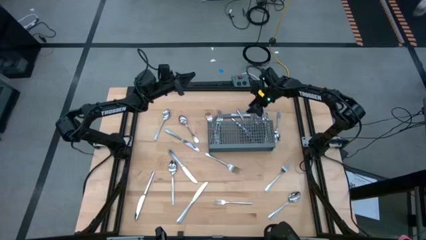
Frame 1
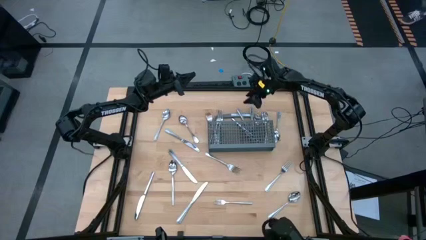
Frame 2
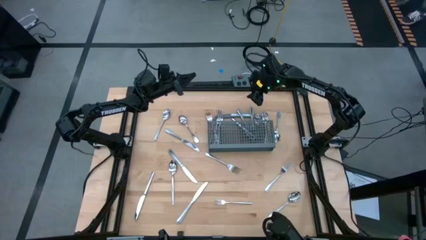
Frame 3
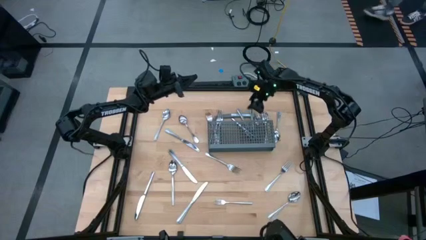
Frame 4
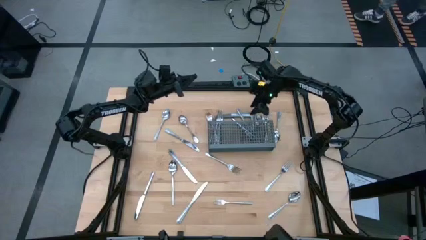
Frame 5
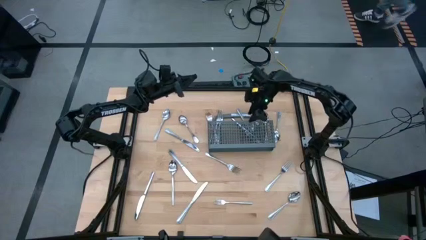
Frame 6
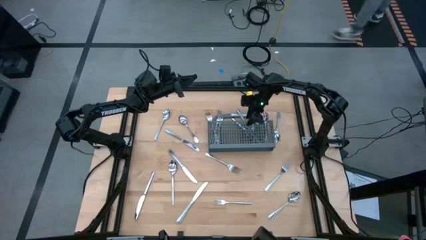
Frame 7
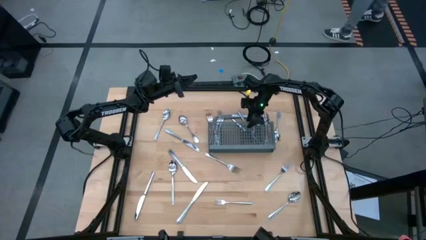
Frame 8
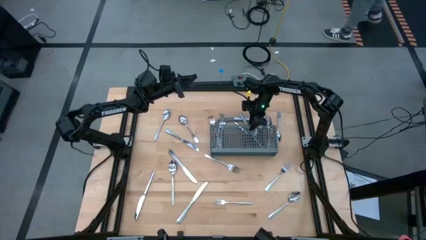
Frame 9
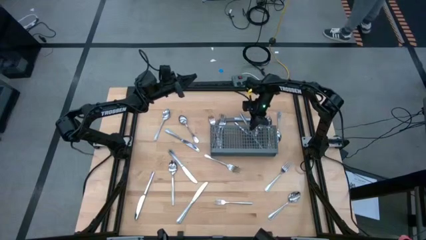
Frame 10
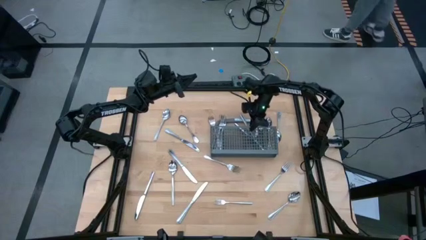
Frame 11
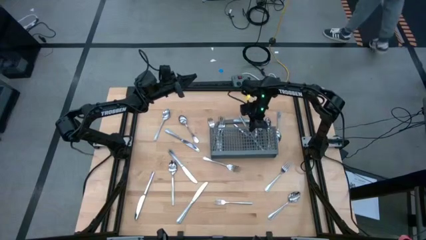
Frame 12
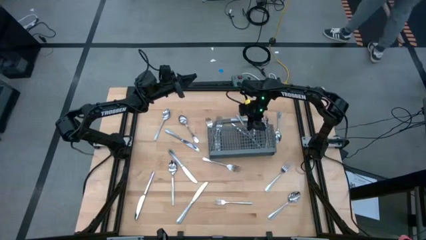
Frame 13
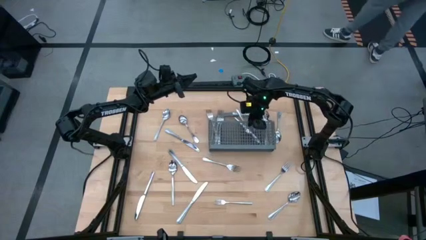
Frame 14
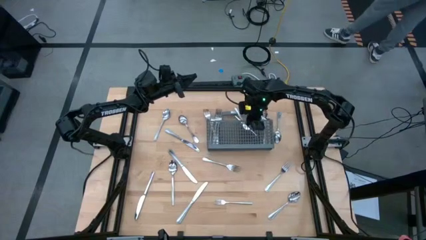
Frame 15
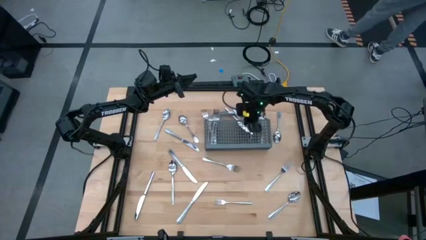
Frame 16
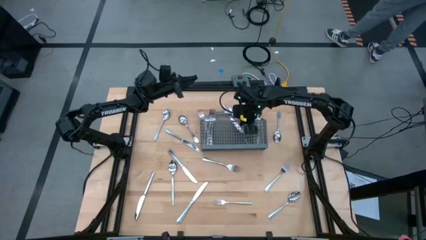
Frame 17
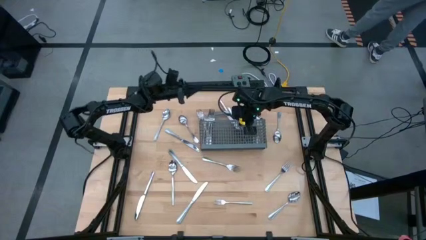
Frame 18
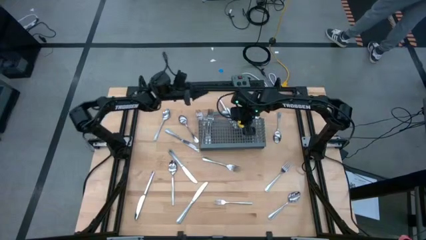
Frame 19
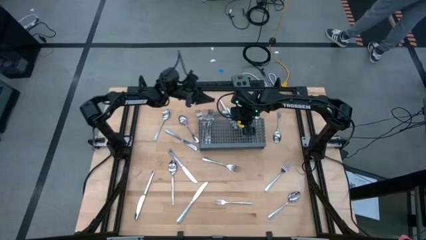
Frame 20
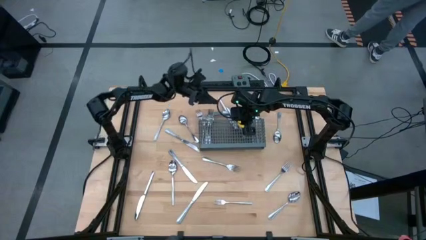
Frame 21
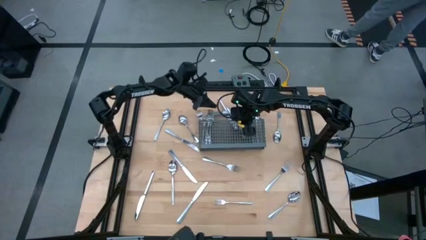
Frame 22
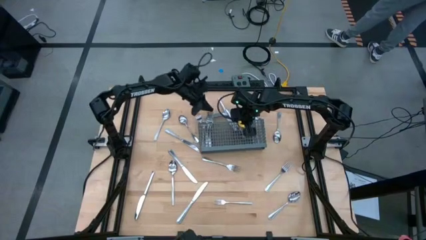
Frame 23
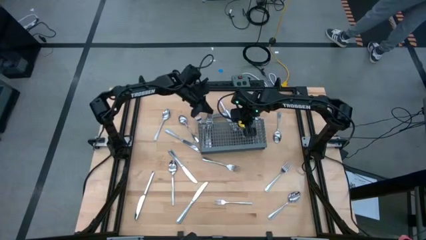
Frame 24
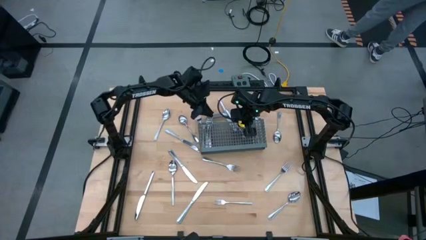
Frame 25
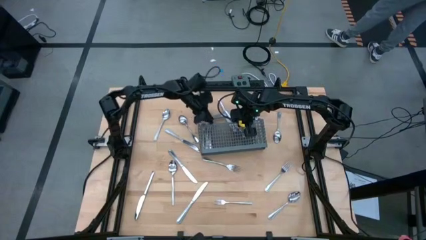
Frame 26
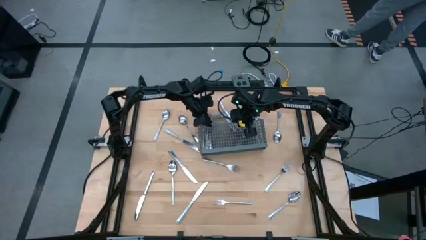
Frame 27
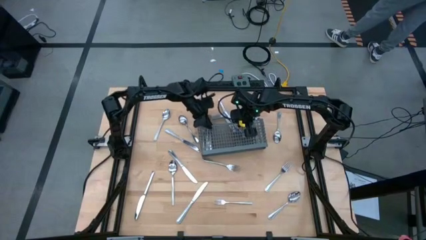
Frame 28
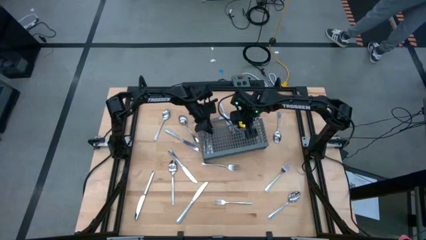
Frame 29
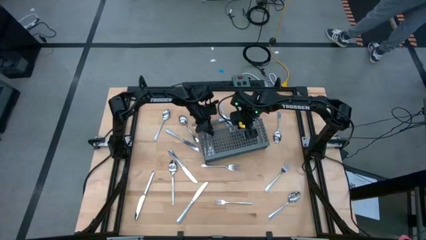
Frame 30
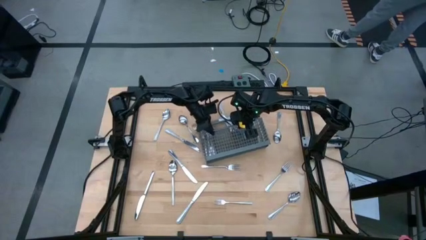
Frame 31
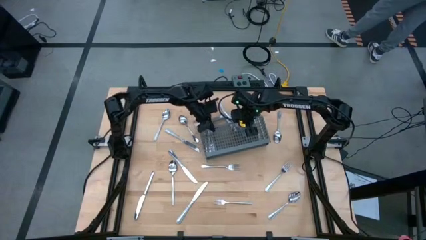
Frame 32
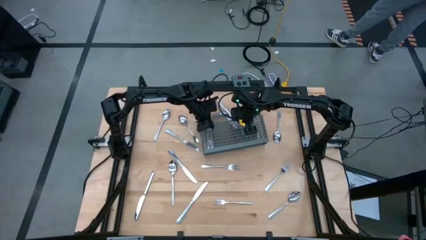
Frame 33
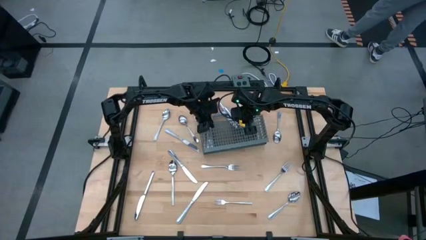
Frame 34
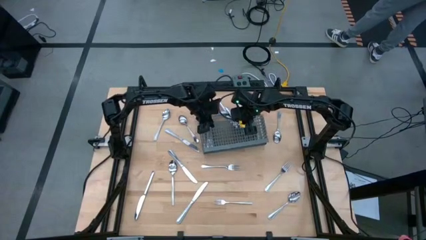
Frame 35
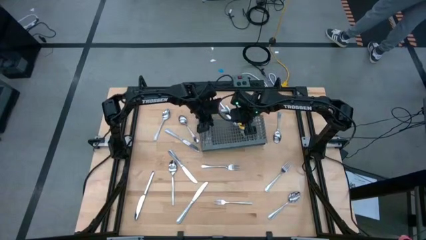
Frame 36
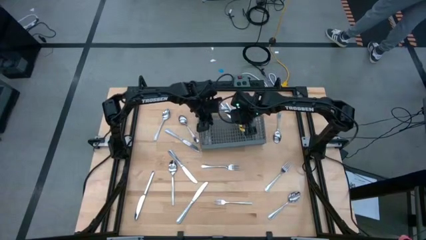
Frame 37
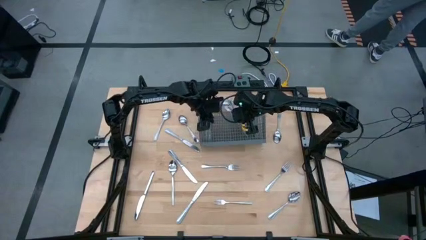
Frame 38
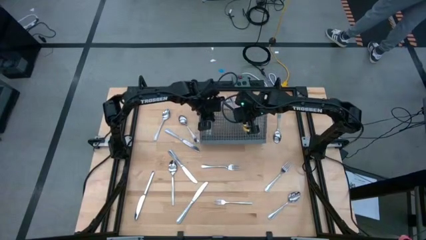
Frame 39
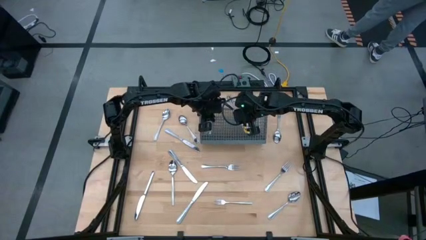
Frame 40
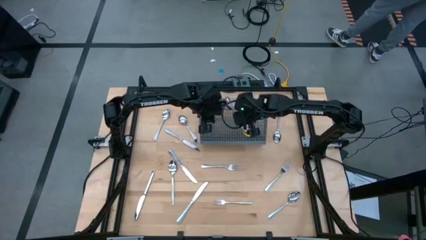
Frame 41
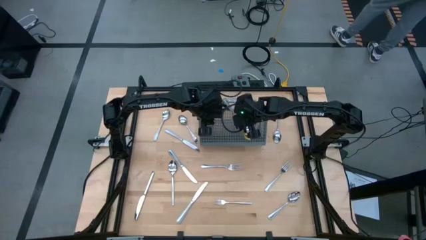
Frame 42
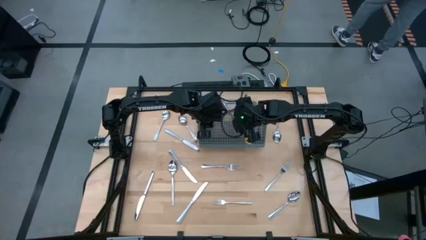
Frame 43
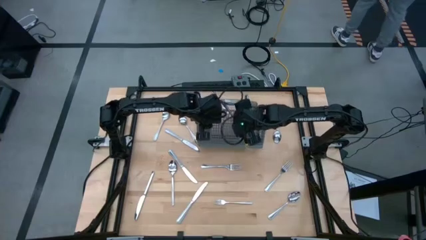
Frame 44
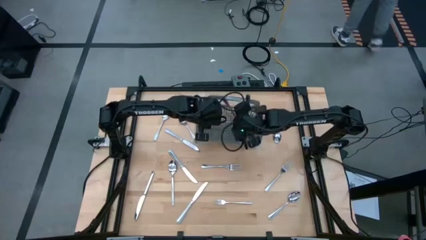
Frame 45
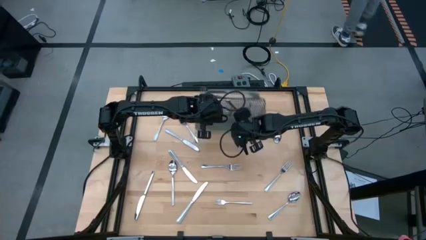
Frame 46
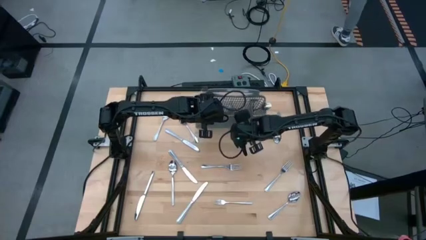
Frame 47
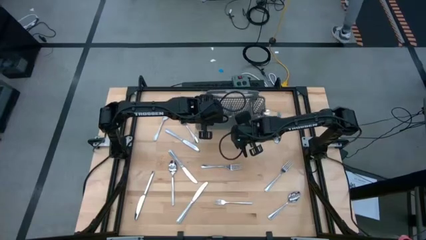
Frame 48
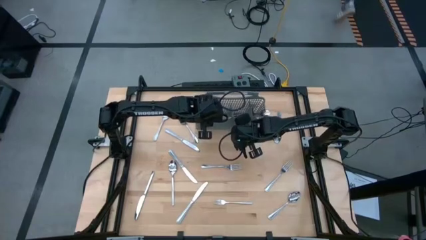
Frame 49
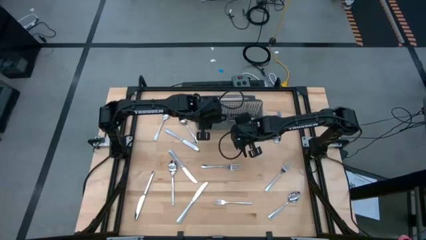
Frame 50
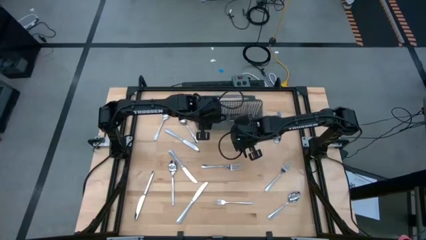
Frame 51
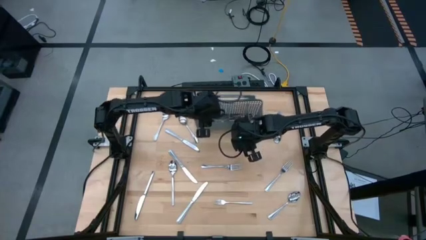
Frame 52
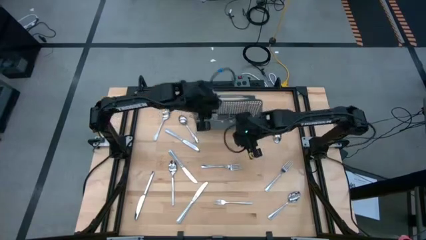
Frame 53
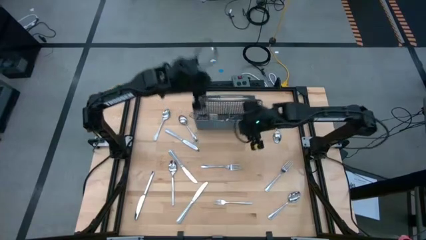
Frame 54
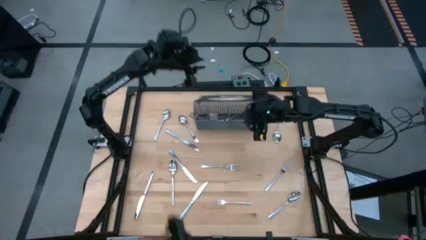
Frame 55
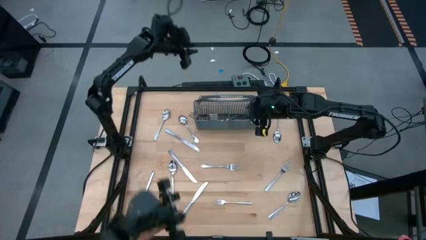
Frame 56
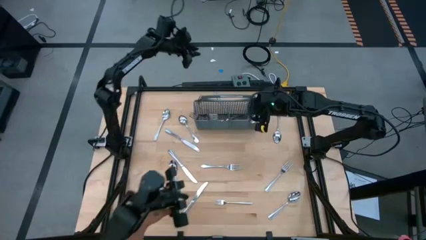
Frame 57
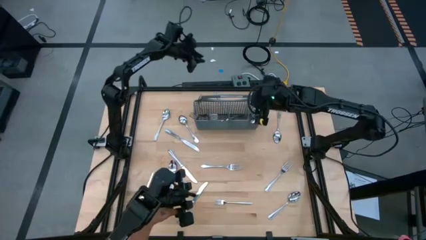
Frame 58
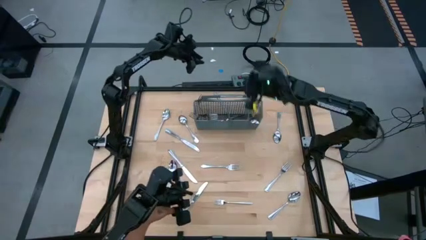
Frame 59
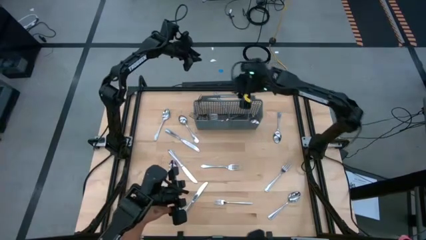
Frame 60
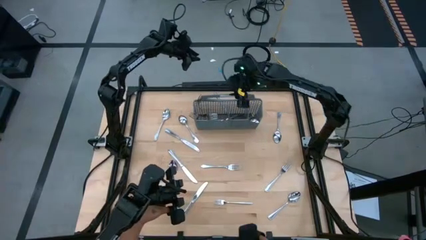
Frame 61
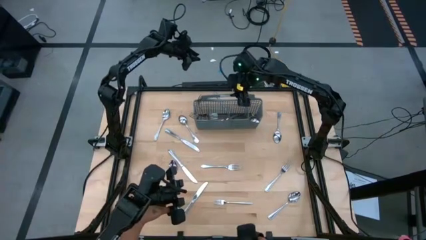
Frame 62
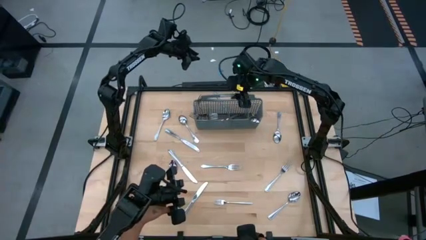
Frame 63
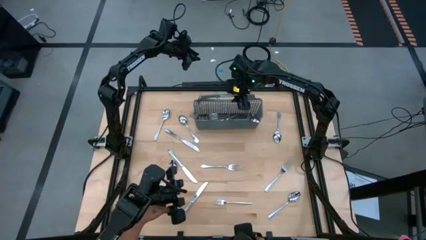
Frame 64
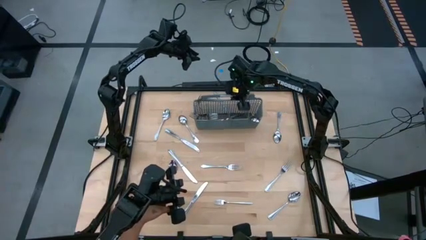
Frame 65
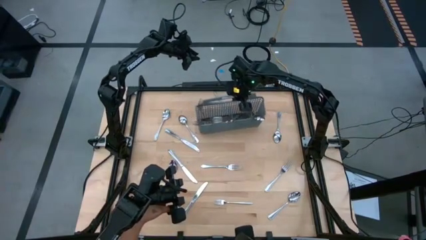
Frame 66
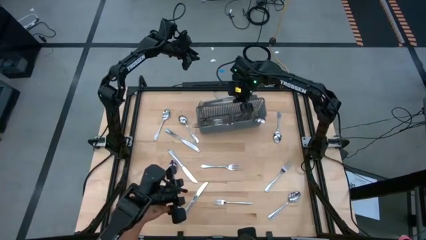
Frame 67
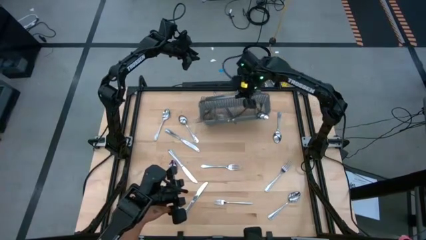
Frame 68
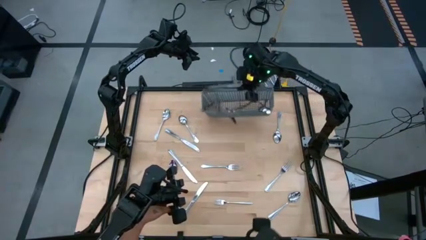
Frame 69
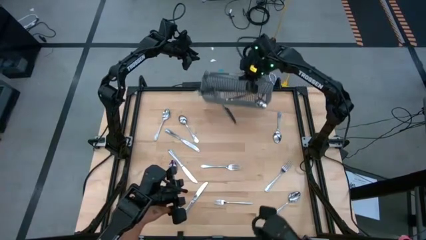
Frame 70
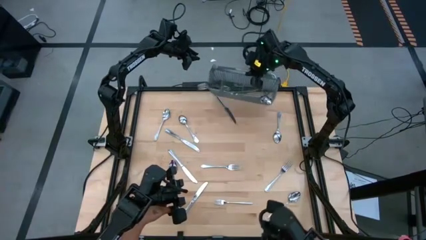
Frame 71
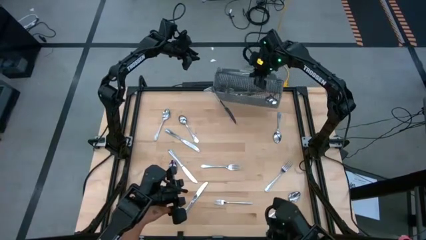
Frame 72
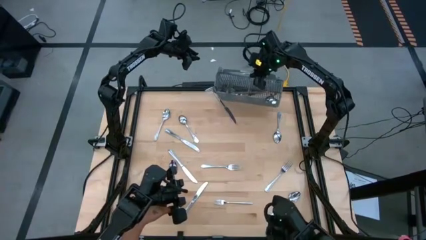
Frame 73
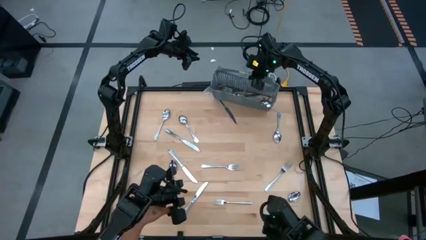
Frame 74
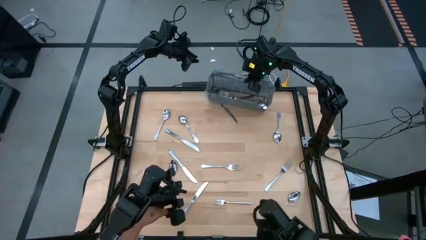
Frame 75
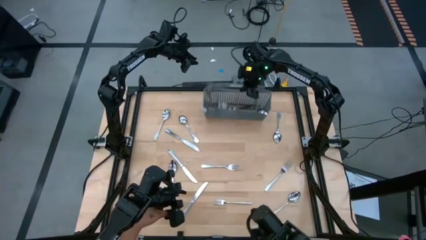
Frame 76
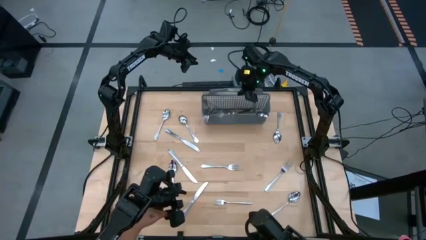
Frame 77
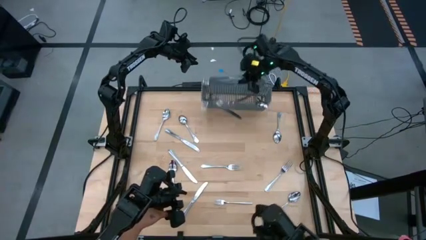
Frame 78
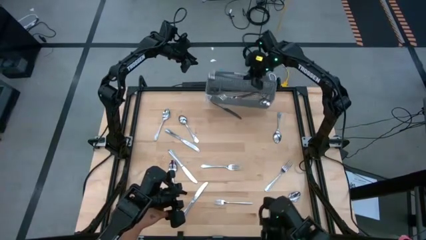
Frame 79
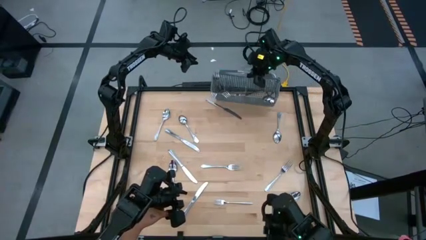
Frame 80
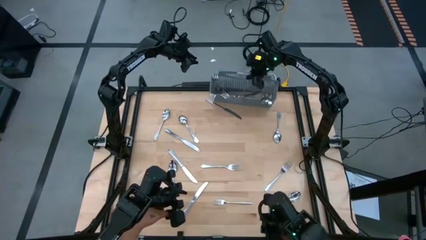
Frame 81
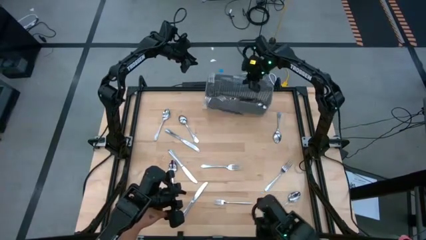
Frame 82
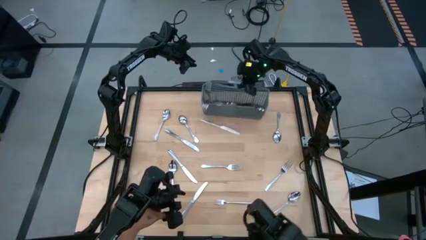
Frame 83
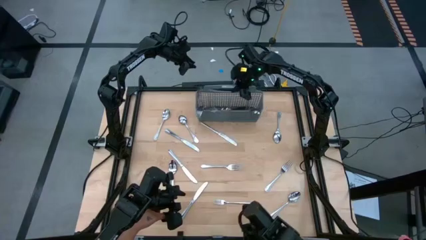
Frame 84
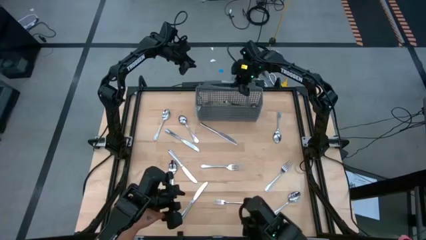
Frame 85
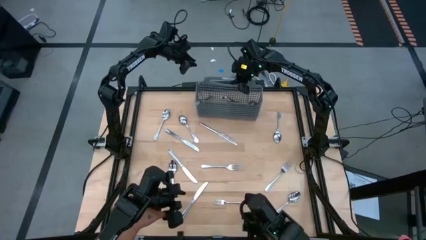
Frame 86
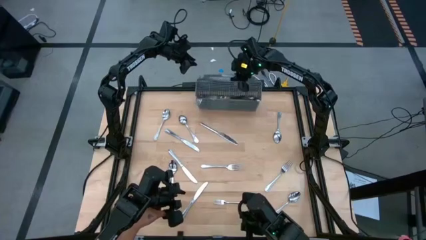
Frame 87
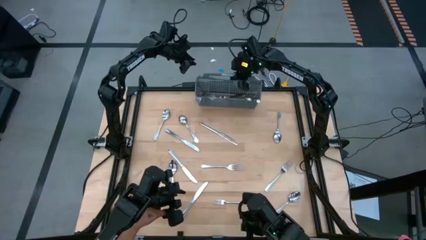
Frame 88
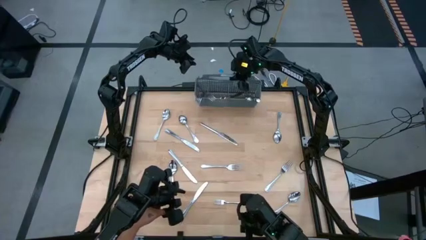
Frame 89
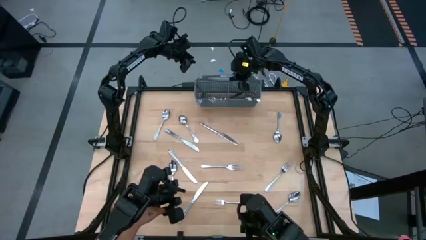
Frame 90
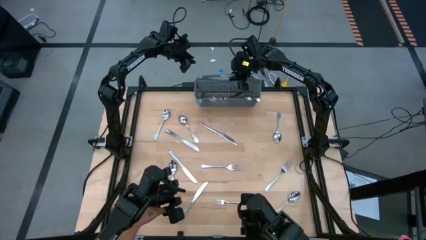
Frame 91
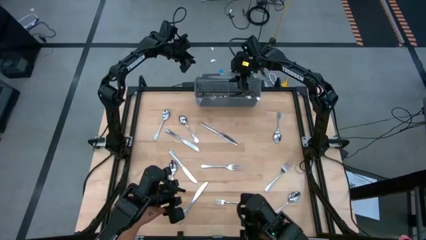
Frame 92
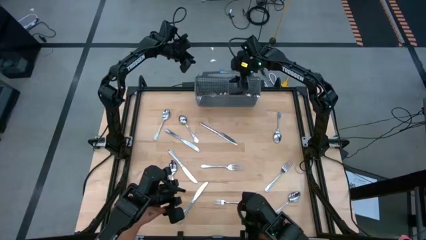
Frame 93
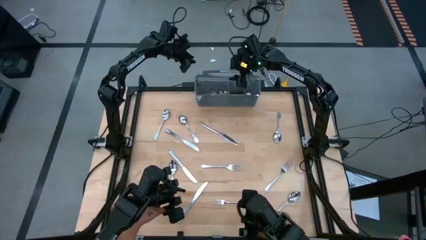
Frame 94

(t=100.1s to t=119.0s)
Task: Sort silverware
Adjust the position of the silverware organizer
